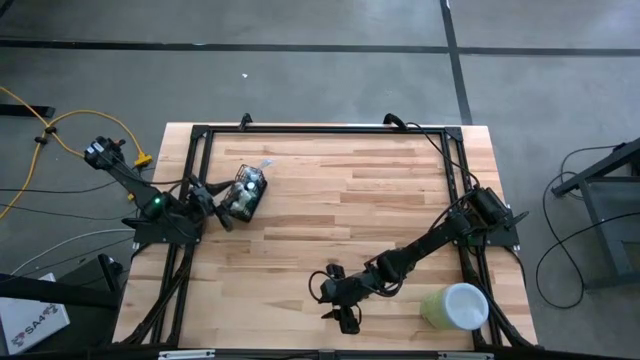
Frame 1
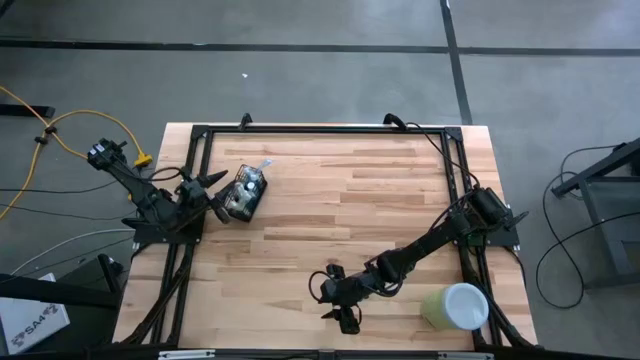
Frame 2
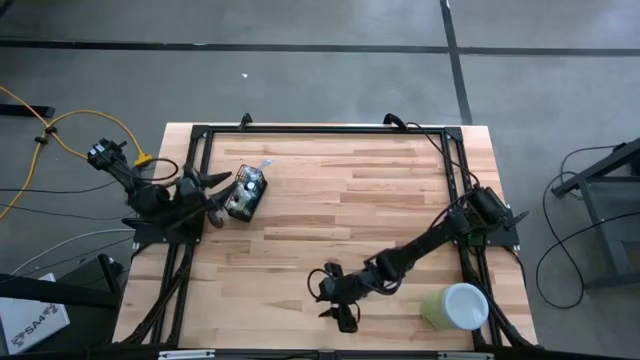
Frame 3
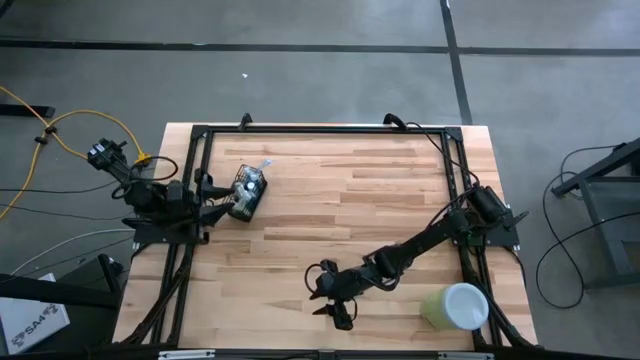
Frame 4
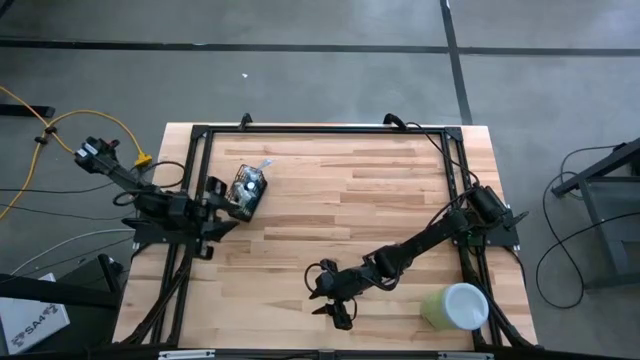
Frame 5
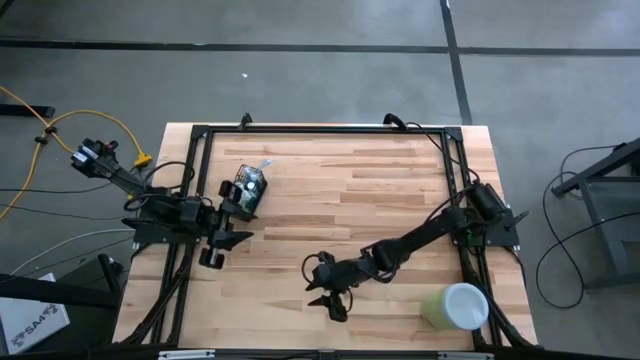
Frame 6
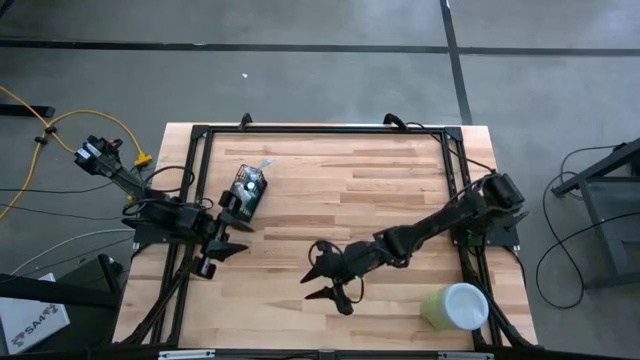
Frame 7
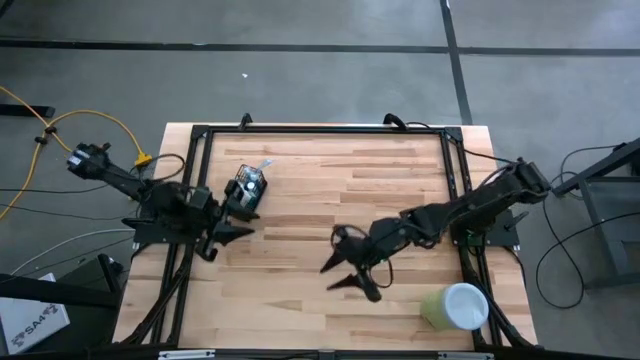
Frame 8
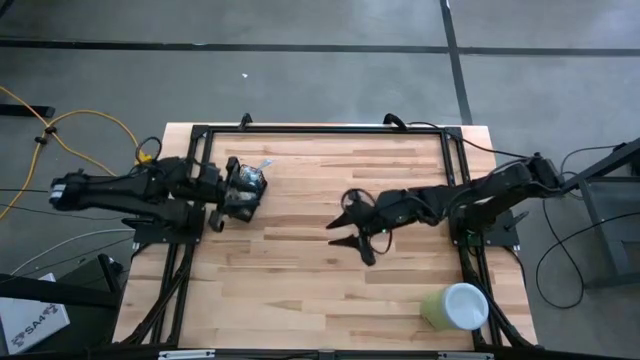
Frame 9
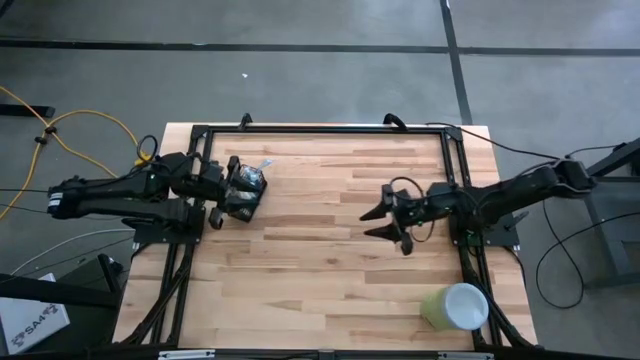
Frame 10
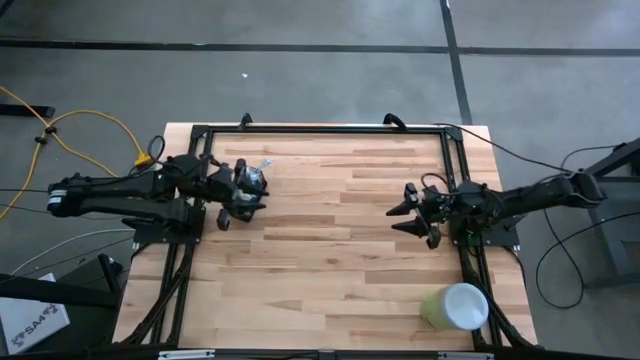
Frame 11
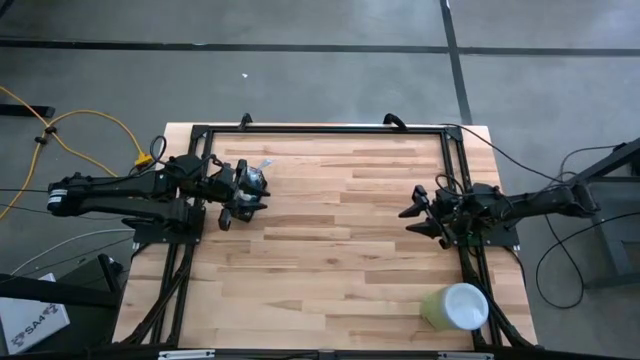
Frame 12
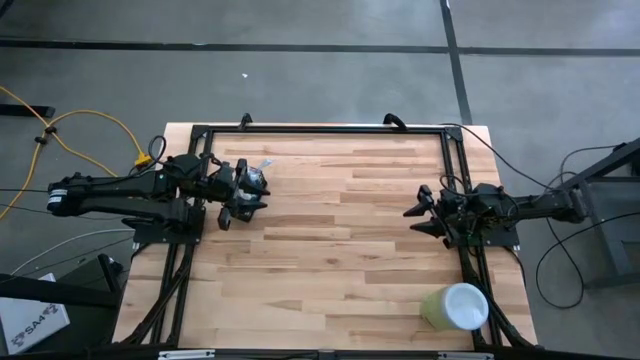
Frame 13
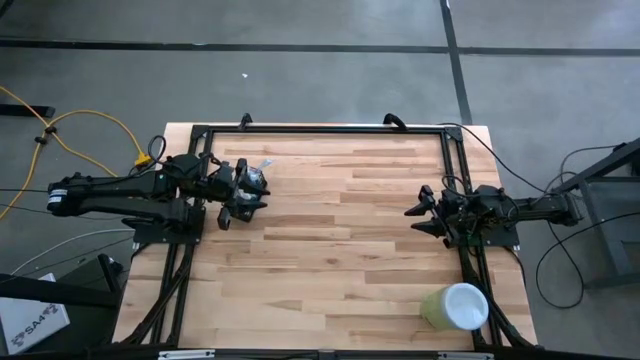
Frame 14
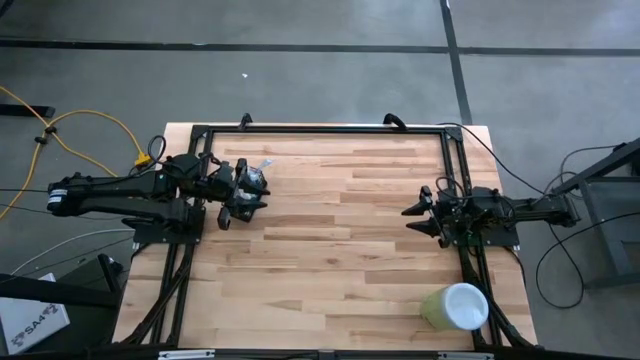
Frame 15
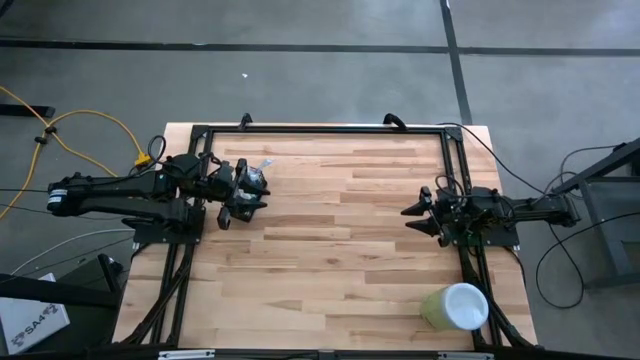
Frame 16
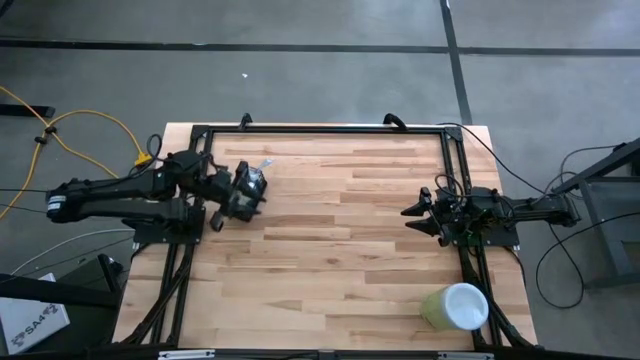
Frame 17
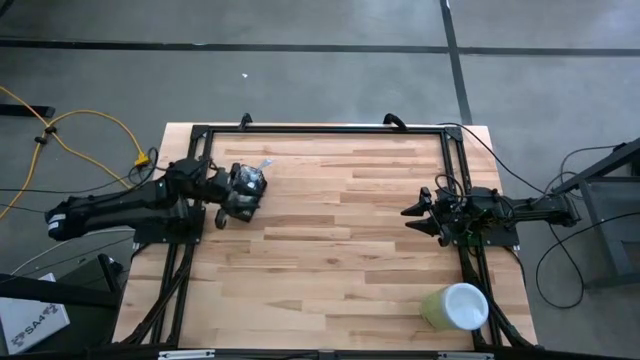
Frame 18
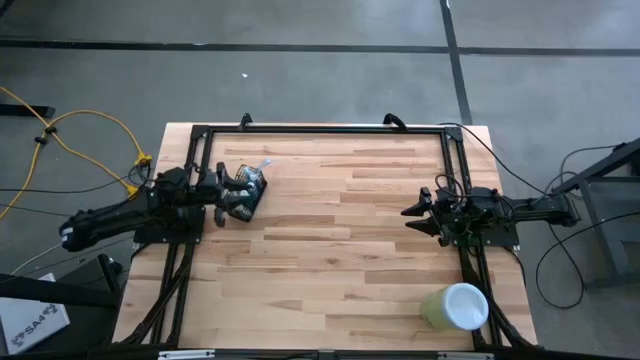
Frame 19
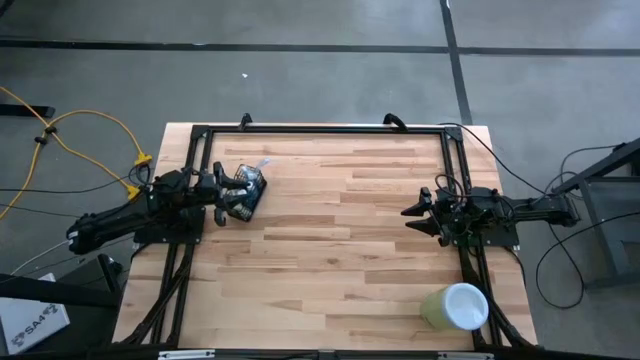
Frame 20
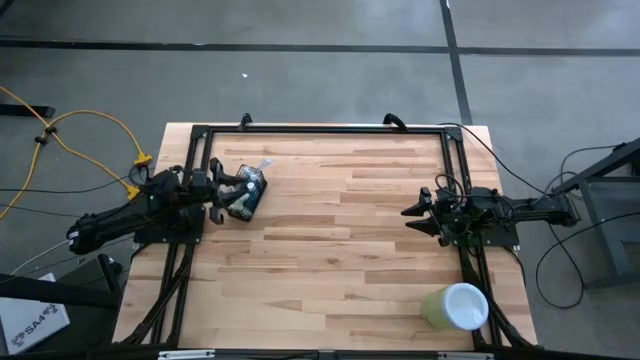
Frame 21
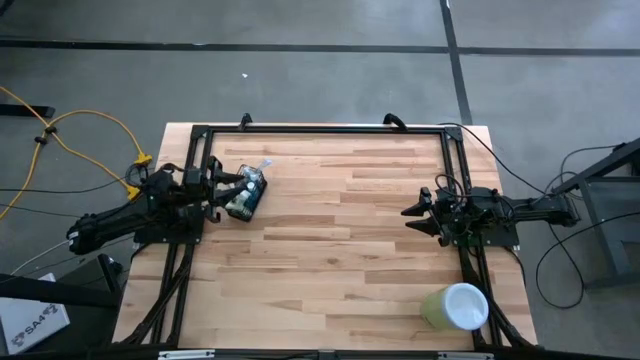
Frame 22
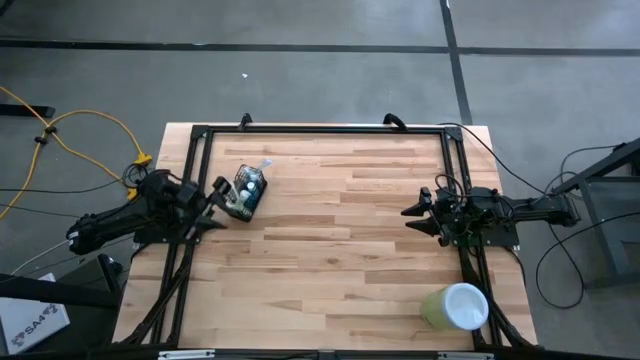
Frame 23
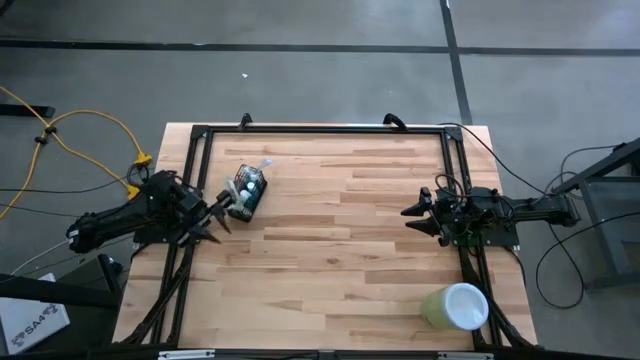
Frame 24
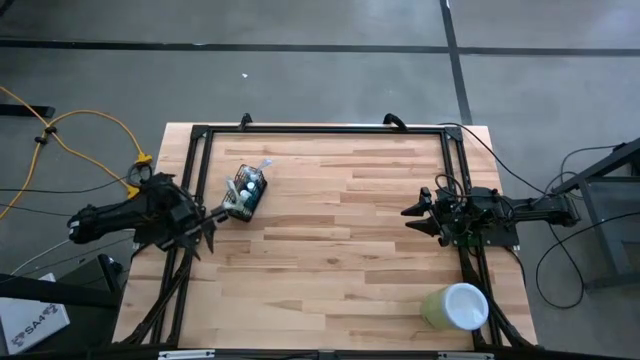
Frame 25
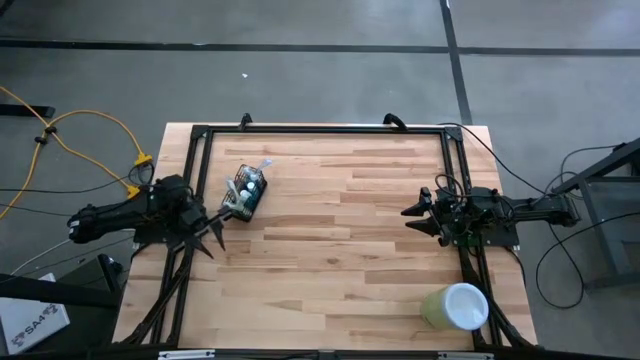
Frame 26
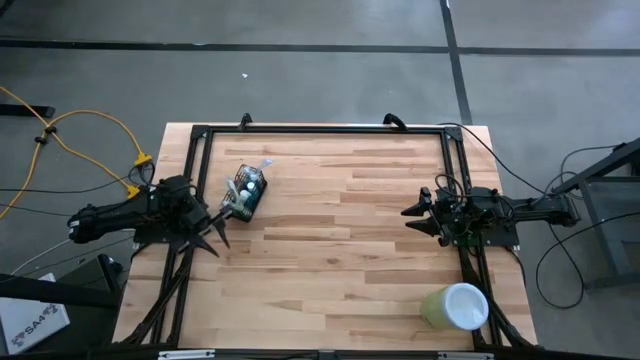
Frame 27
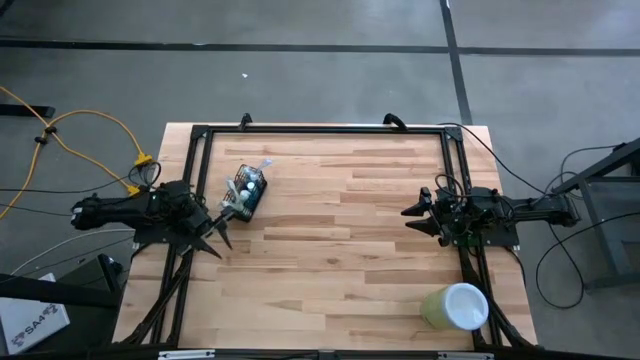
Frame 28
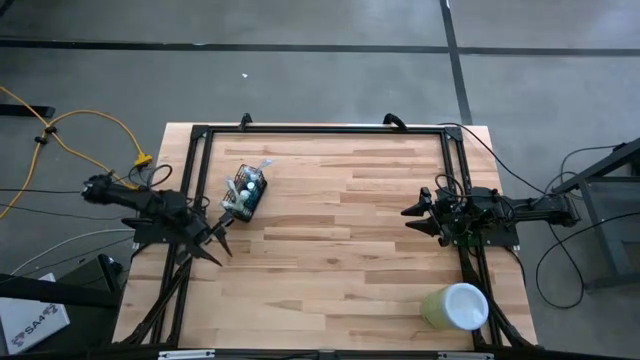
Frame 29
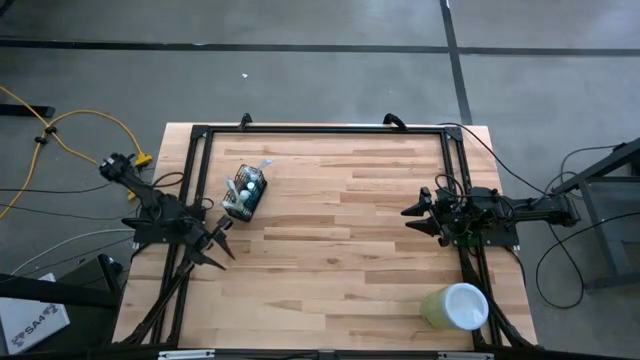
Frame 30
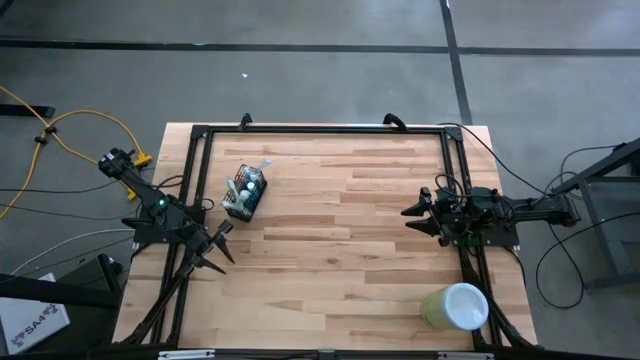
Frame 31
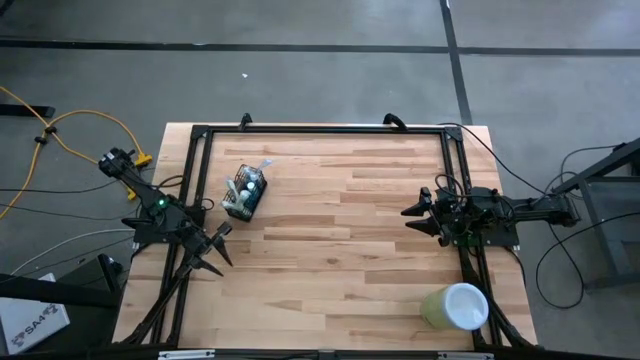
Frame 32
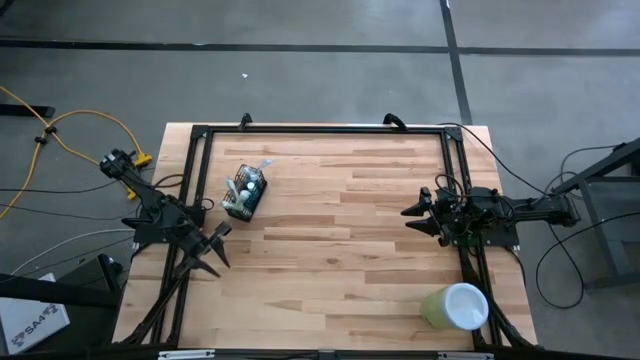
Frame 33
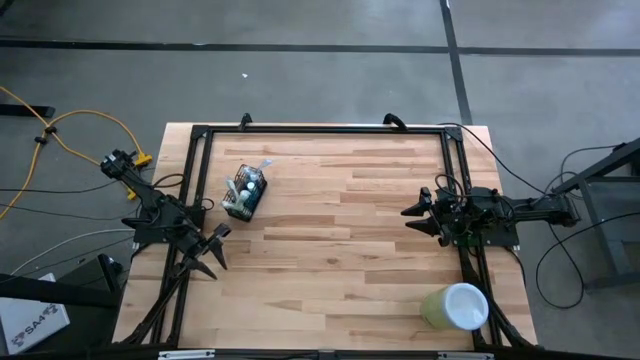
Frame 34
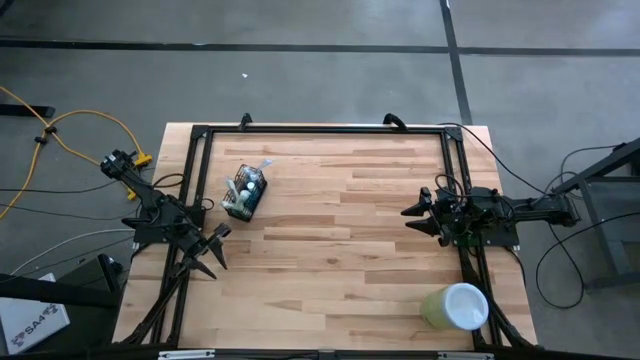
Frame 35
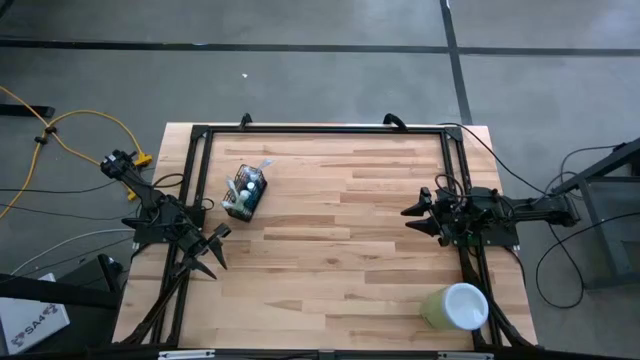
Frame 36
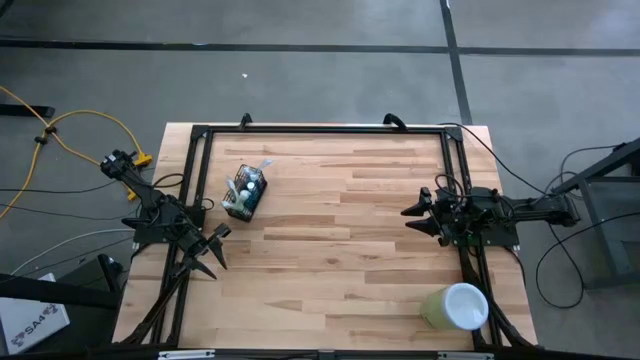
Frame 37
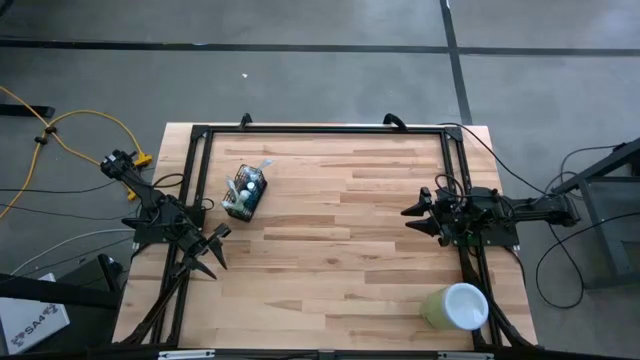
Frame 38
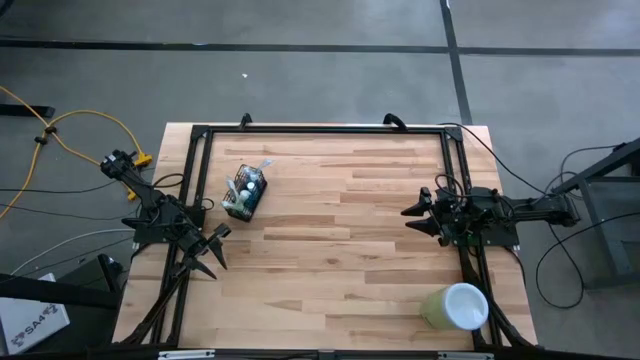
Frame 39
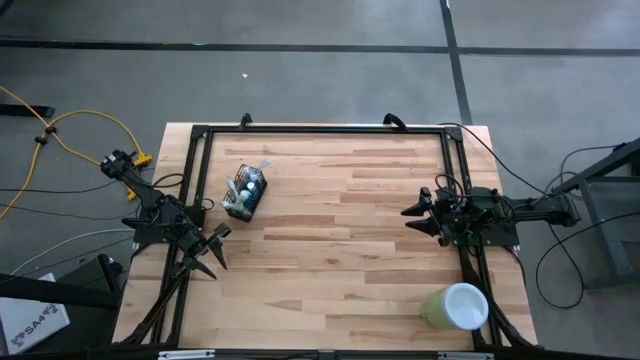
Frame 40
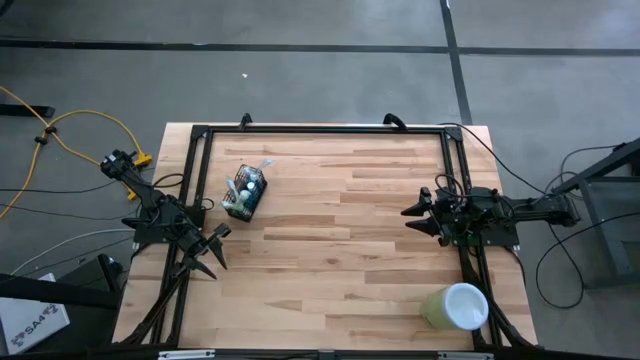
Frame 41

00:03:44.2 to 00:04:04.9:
Task: Pick & Place toothbrushing station
Return to Home Position
